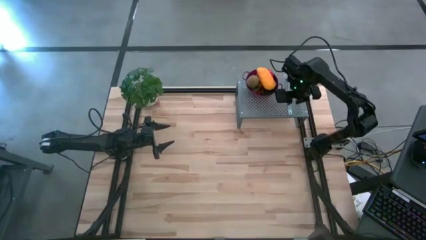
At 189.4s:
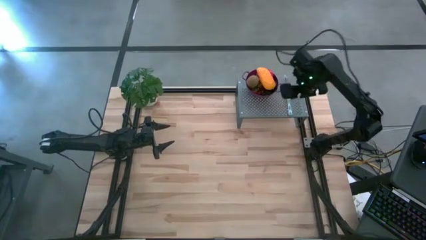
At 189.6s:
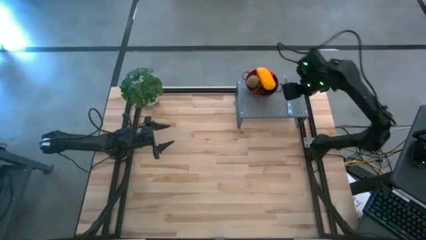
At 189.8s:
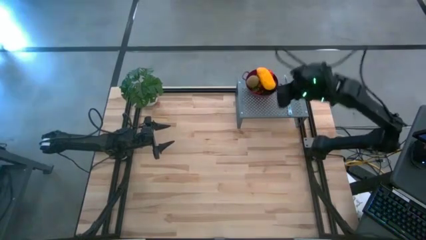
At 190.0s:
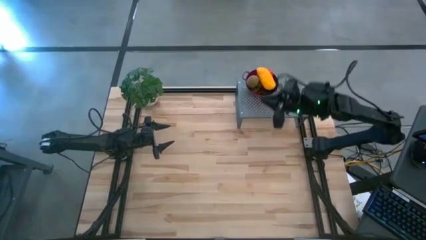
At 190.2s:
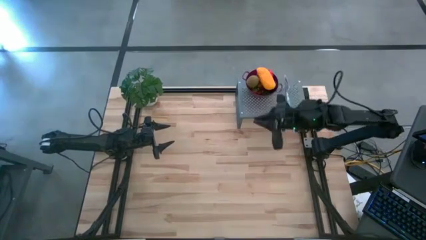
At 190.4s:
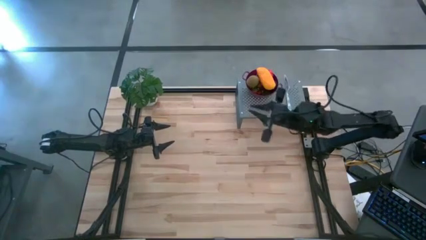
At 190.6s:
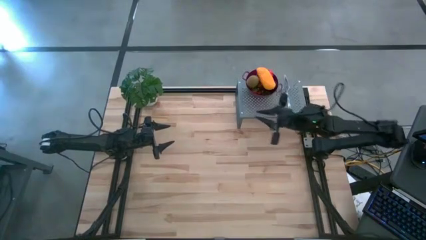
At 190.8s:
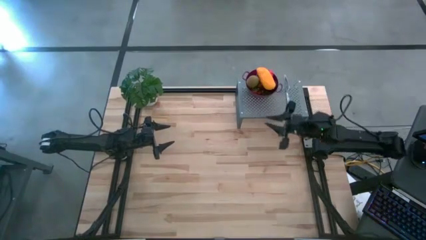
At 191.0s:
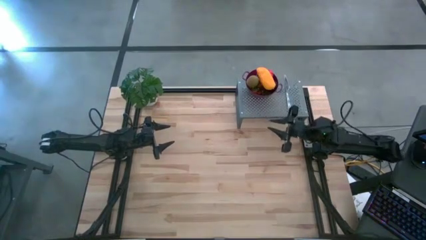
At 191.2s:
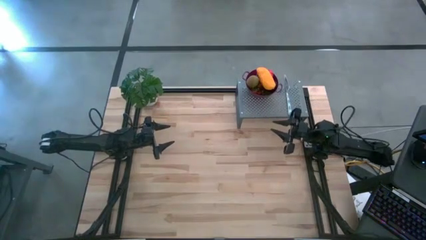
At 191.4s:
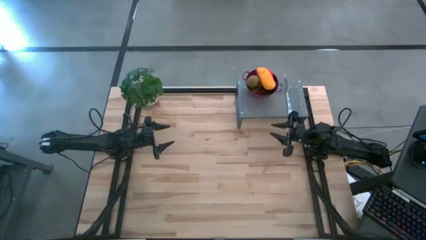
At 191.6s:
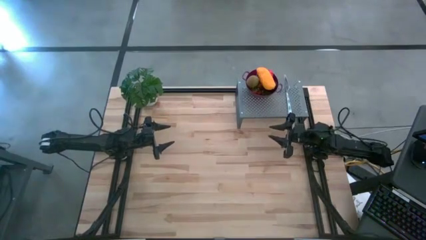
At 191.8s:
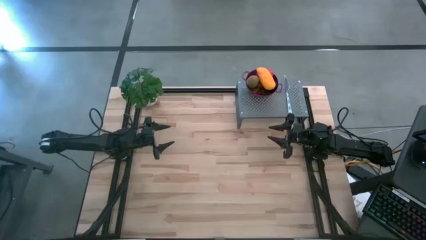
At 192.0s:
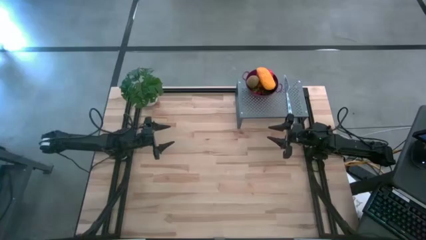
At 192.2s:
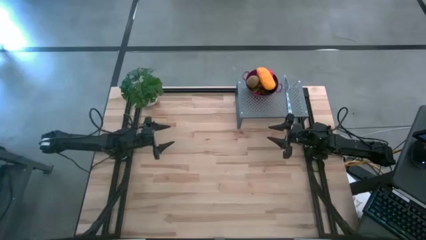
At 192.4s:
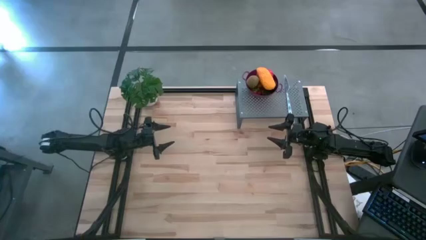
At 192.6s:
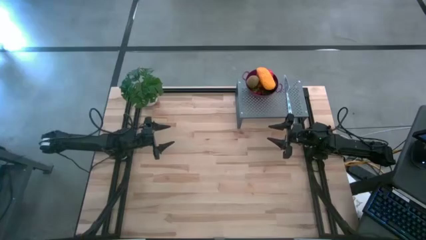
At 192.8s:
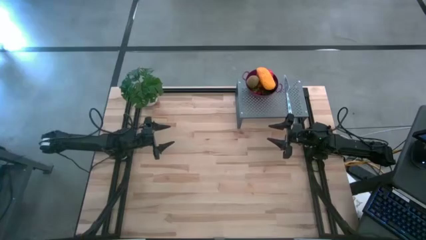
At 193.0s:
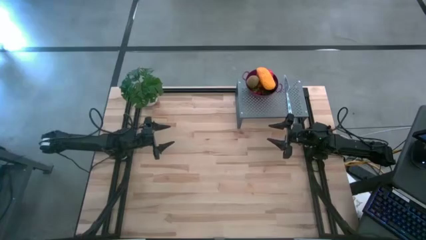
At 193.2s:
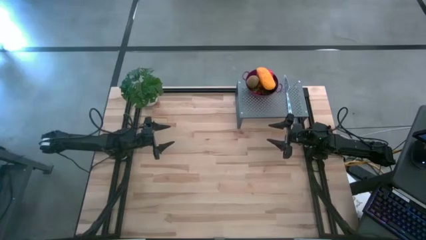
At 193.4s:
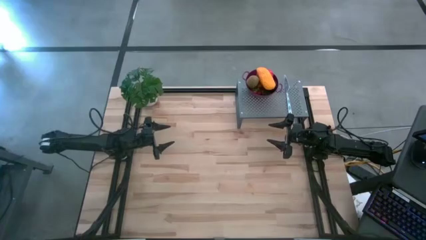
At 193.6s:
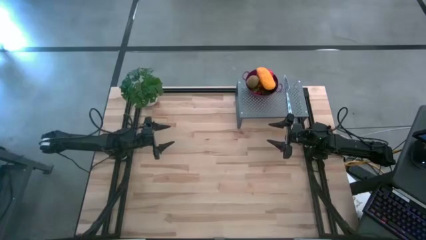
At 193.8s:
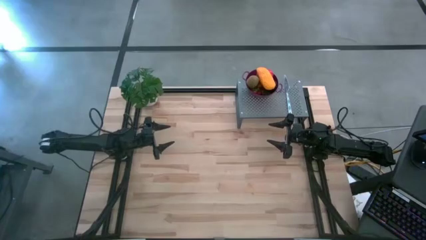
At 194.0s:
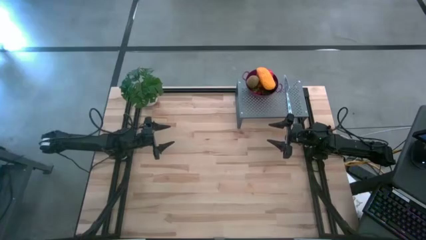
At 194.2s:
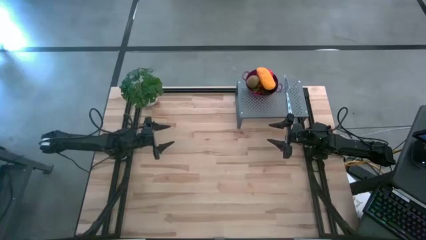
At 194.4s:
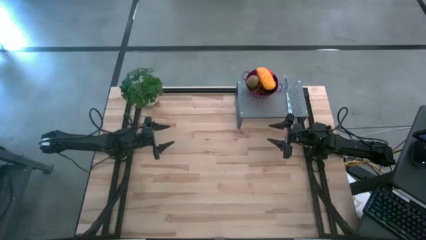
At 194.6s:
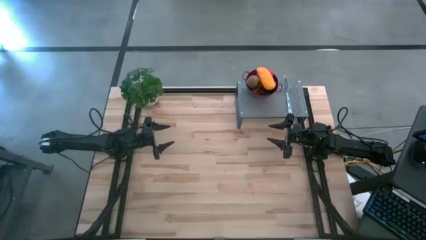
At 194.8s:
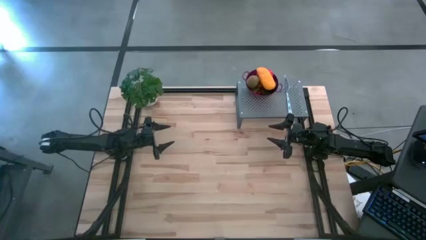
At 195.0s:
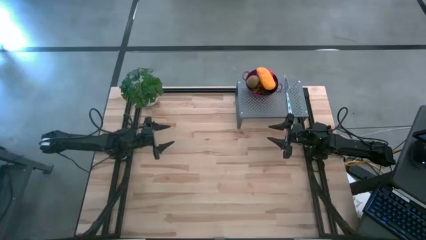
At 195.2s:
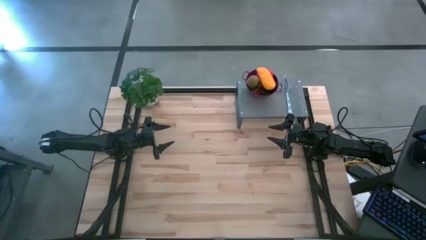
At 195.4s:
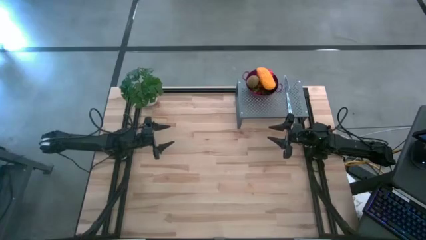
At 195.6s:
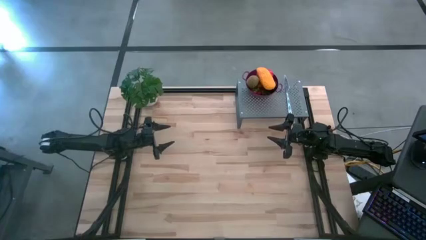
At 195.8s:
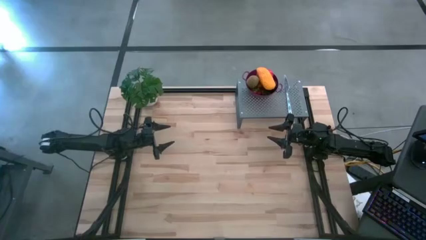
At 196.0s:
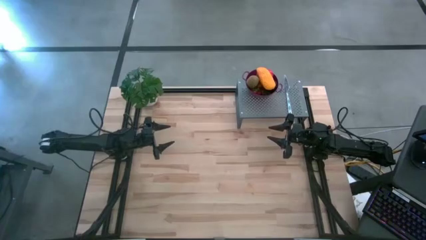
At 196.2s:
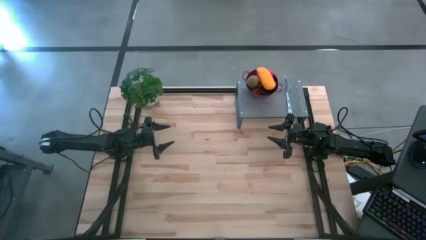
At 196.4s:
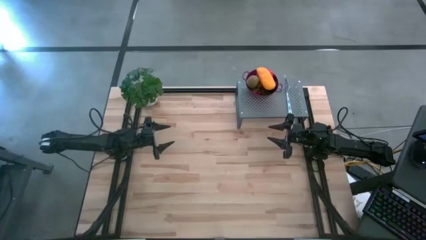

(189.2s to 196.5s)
Task: Pick & Place Fruit
Return to Home Position

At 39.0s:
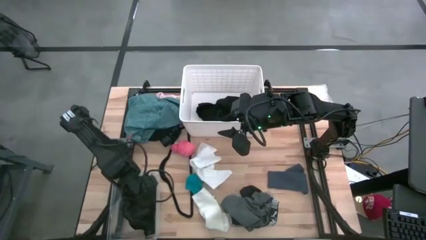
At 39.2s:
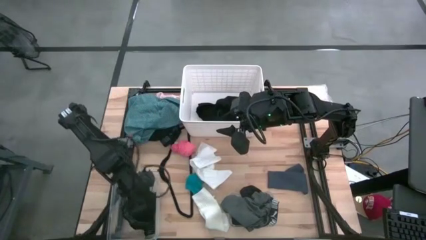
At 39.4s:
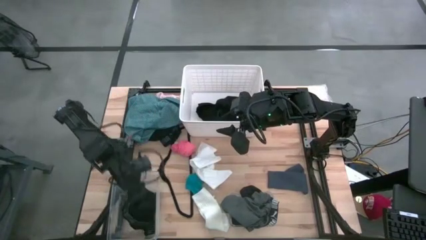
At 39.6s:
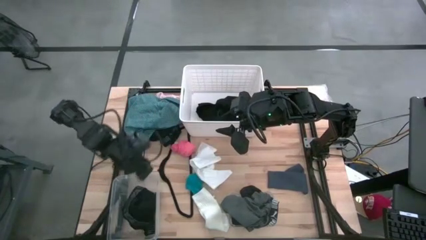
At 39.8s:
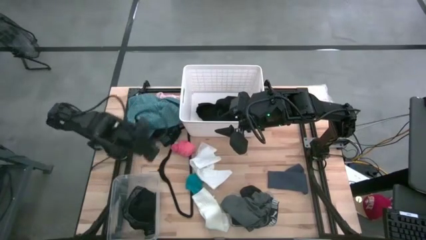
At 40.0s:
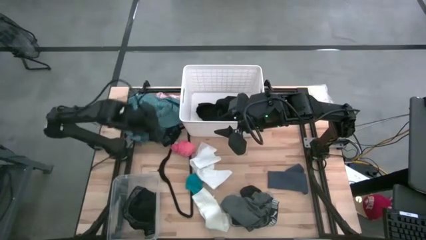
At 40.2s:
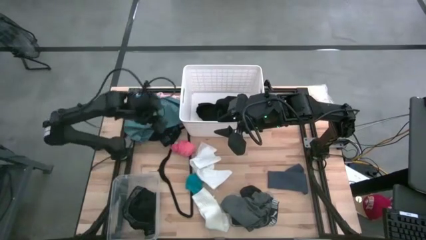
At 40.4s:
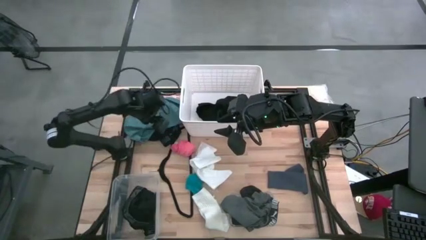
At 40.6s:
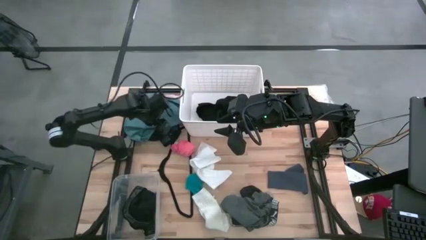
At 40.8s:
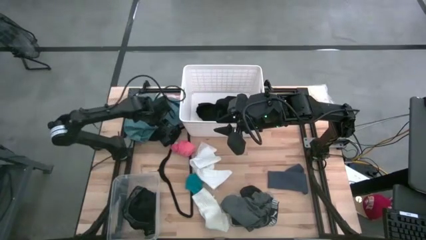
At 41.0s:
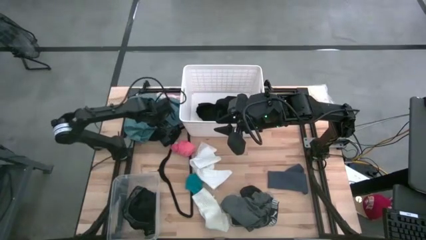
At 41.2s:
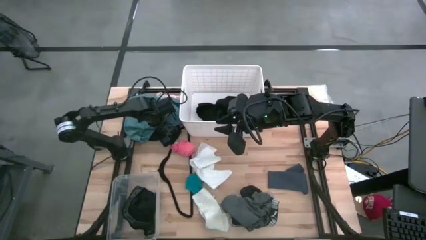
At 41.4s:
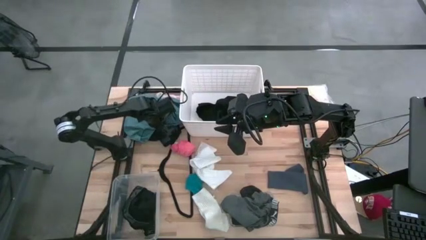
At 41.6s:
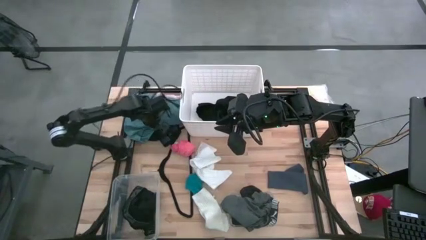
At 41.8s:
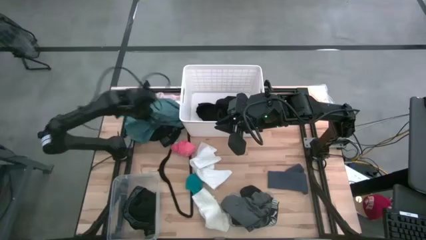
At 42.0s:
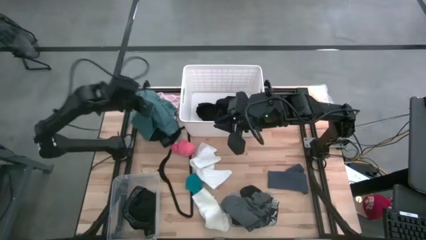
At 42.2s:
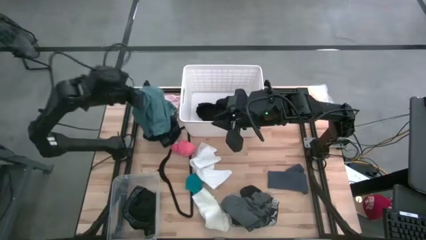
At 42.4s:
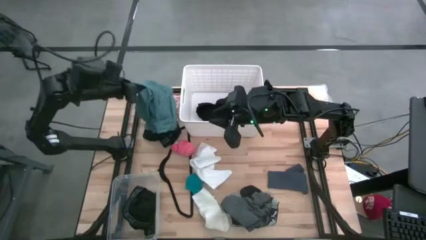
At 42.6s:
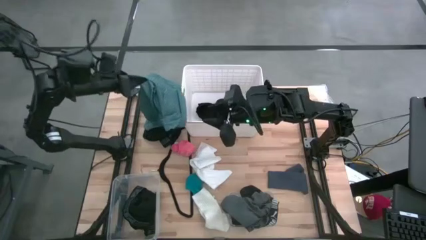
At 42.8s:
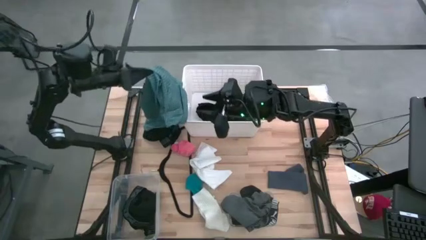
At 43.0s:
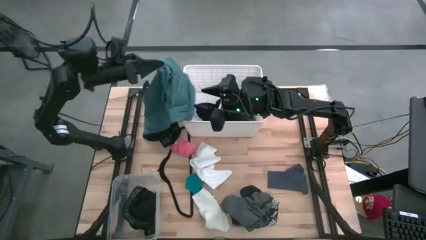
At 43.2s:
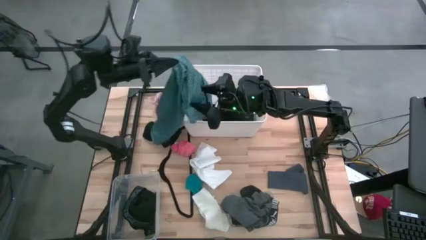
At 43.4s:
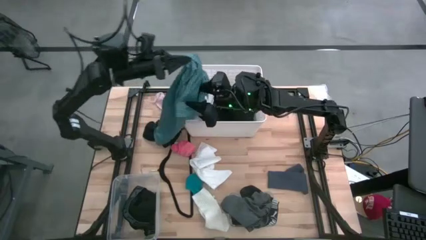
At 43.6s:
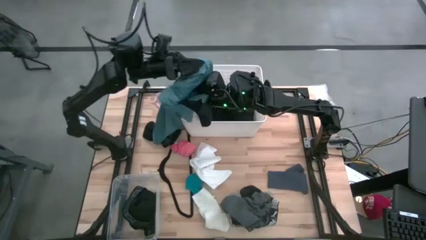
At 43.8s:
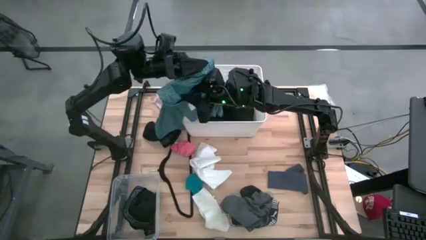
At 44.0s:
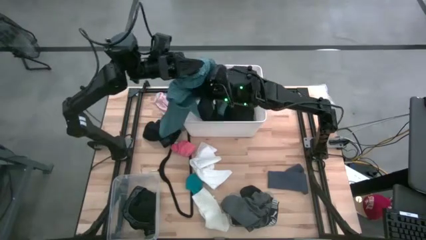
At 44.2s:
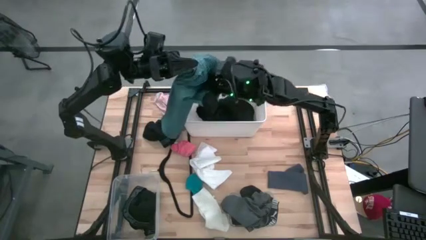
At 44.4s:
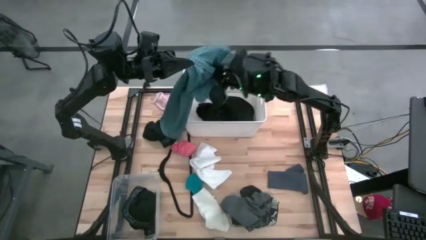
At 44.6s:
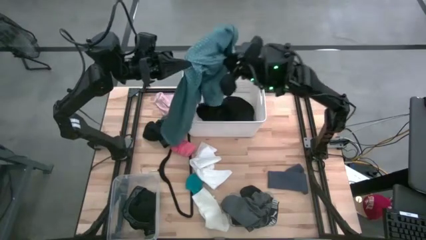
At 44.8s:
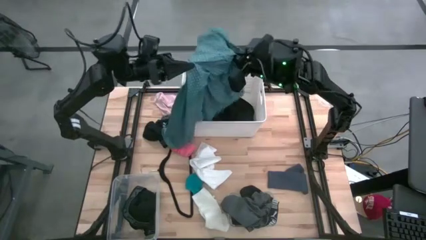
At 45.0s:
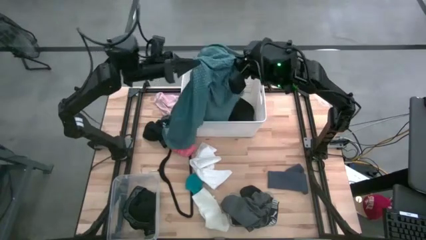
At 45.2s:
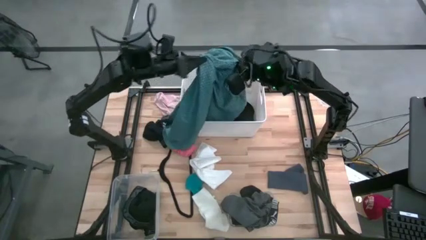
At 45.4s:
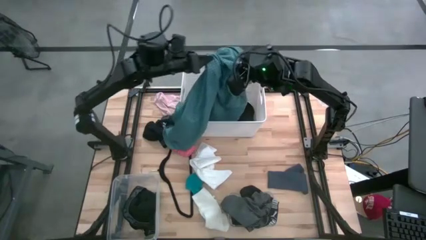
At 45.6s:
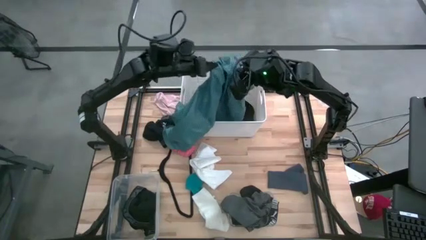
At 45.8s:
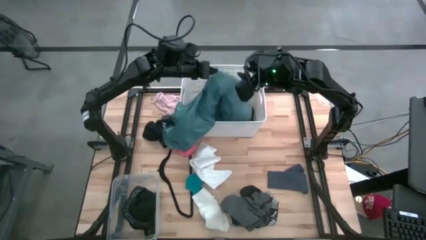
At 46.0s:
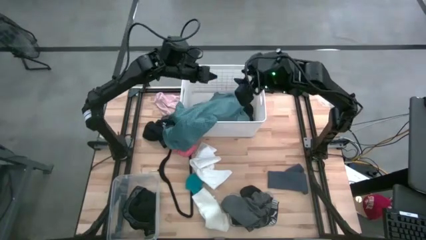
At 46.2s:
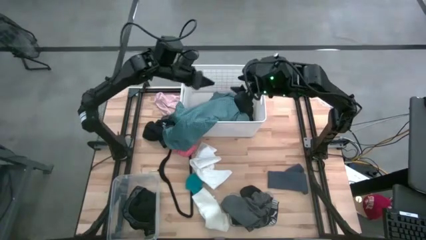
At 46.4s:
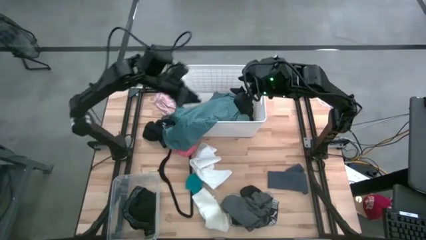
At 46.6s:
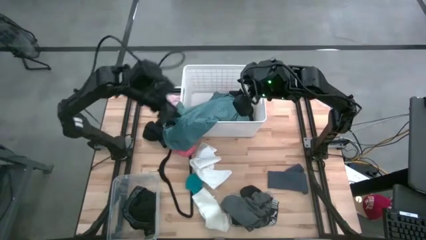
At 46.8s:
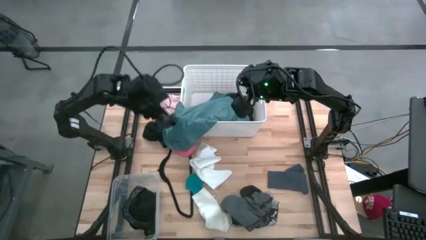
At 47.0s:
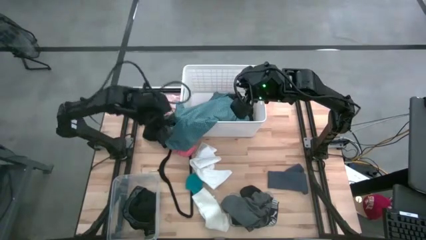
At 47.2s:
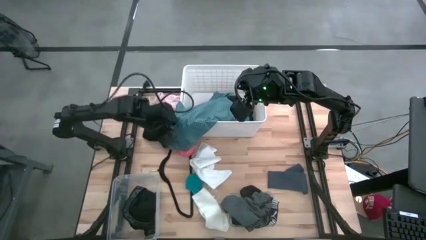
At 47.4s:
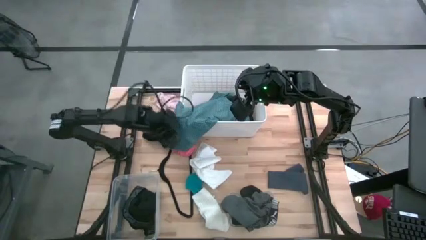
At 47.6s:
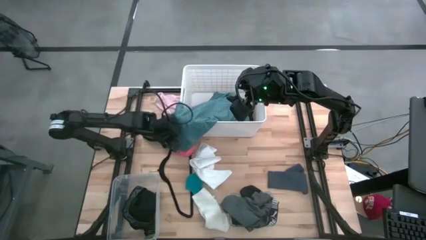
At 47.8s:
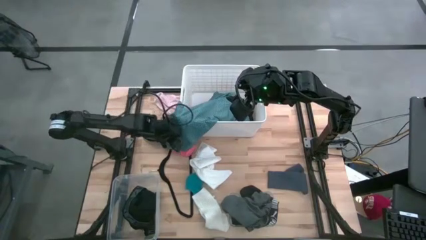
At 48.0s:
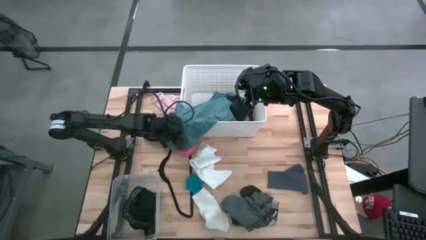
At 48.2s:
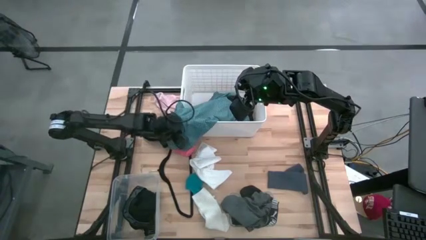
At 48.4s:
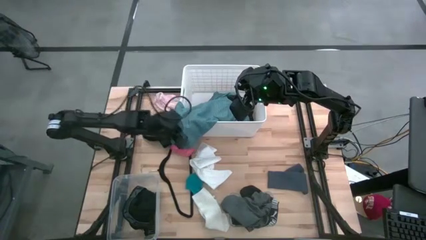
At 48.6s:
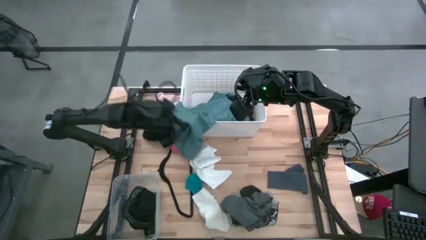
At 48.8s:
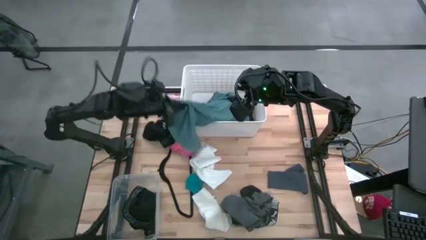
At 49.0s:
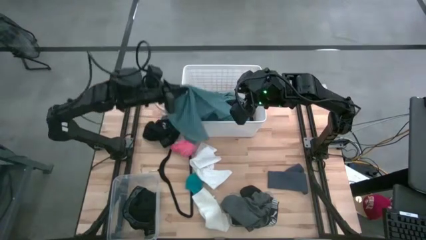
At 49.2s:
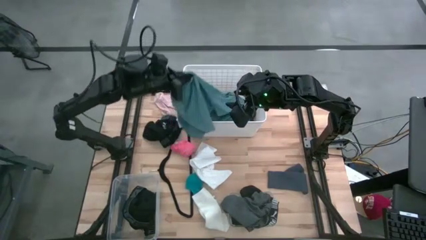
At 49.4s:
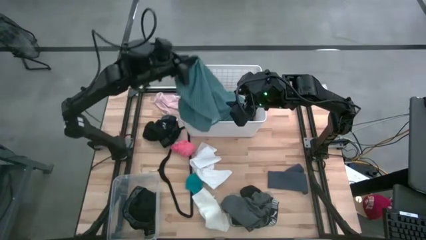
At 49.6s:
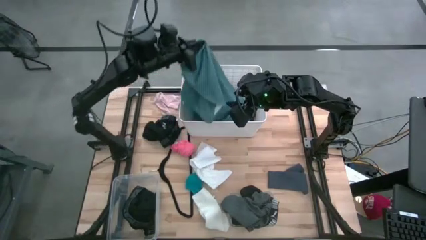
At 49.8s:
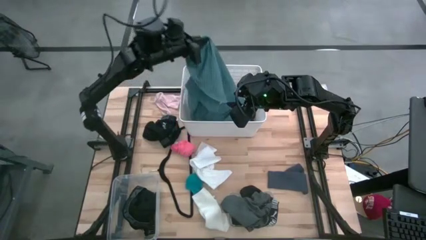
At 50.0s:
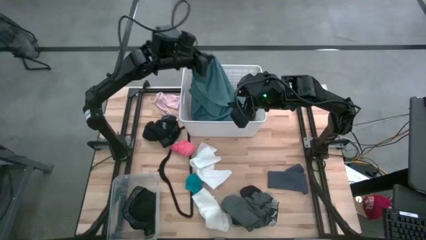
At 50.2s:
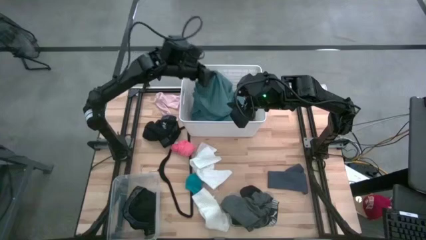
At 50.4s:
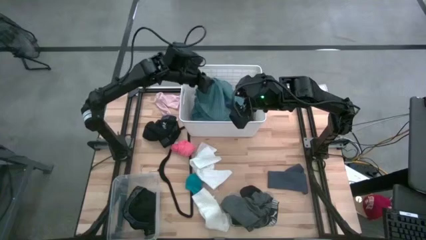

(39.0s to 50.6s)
Task: Pick & Place Cloths
Put the blue polo shirt into the laundry bin
